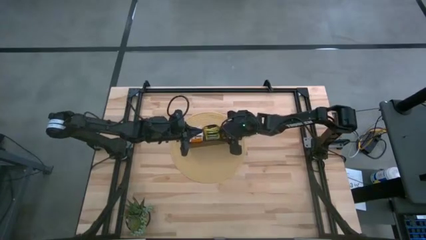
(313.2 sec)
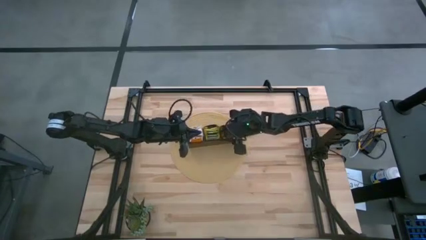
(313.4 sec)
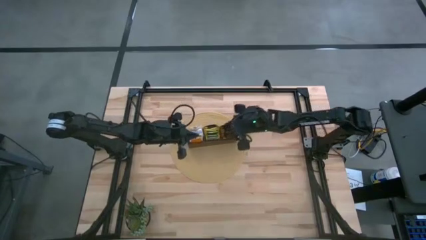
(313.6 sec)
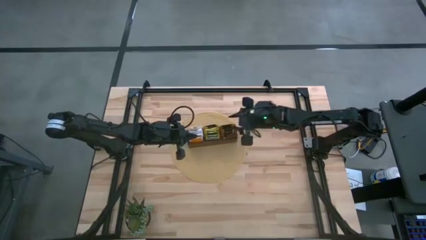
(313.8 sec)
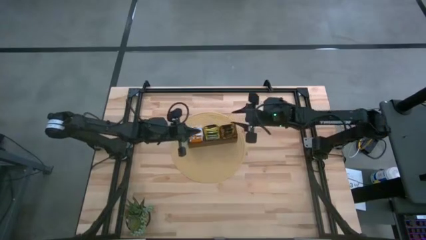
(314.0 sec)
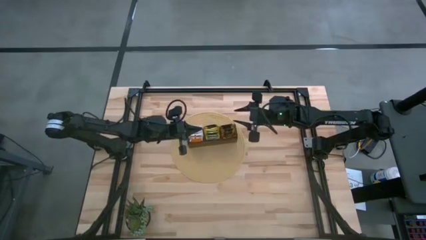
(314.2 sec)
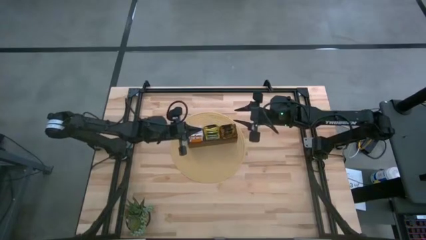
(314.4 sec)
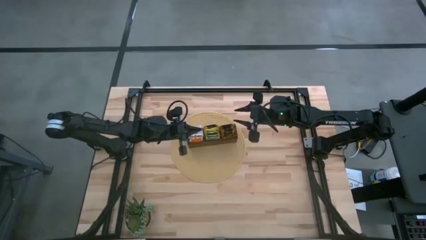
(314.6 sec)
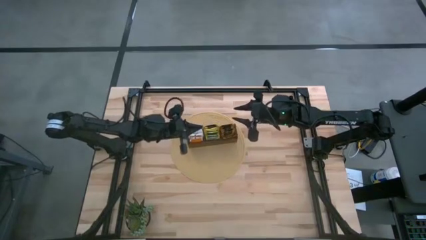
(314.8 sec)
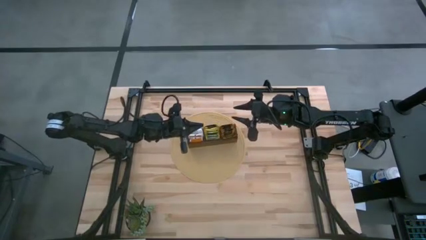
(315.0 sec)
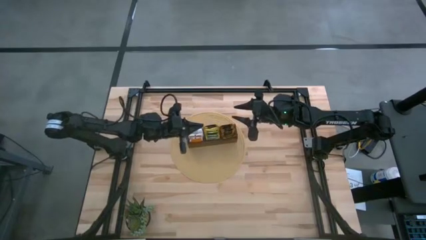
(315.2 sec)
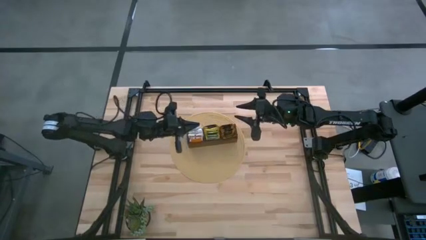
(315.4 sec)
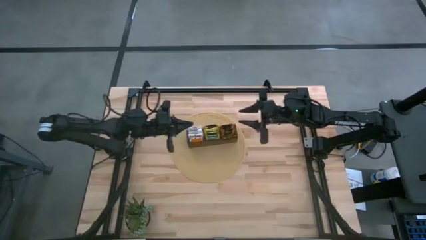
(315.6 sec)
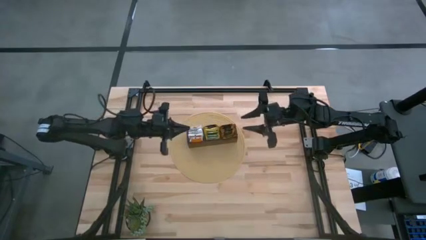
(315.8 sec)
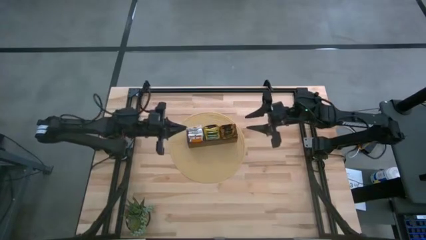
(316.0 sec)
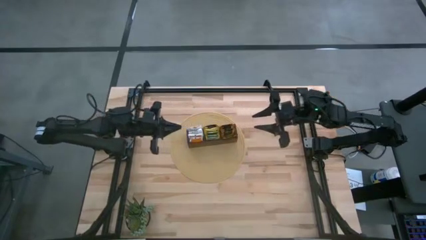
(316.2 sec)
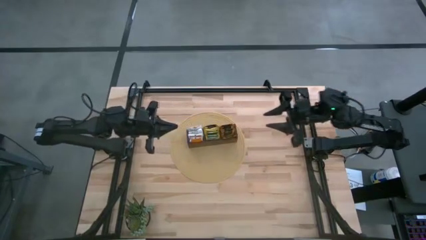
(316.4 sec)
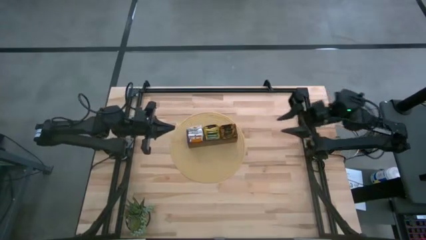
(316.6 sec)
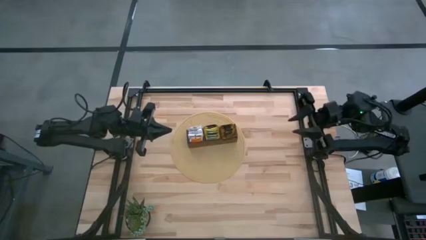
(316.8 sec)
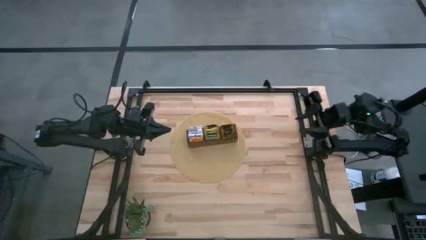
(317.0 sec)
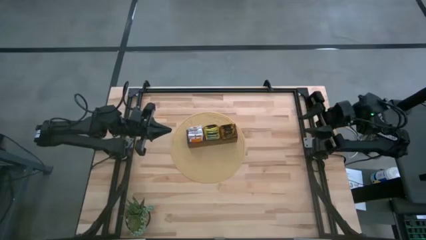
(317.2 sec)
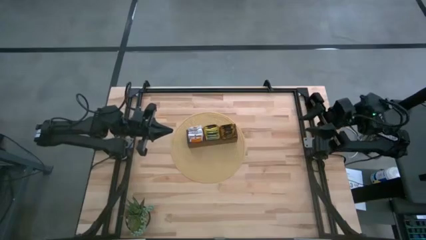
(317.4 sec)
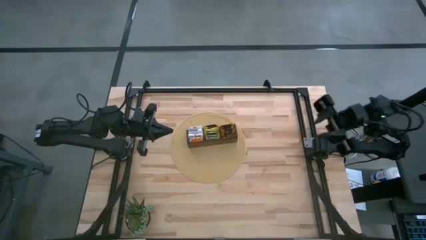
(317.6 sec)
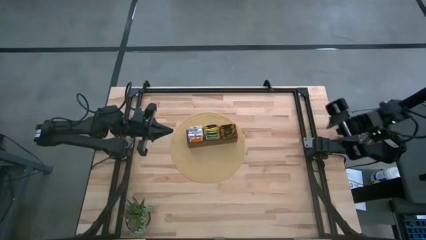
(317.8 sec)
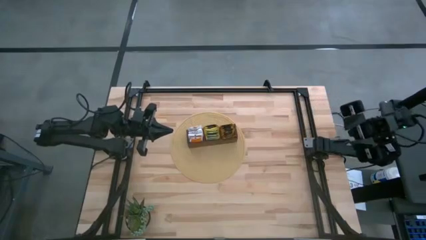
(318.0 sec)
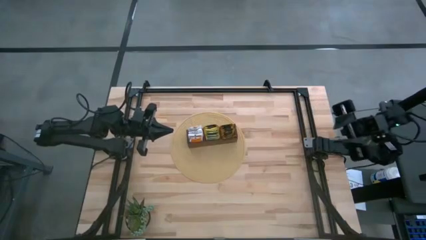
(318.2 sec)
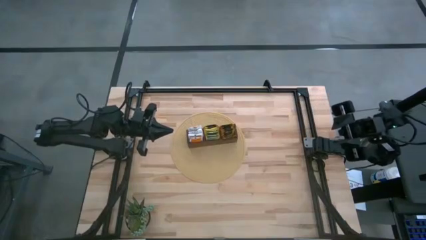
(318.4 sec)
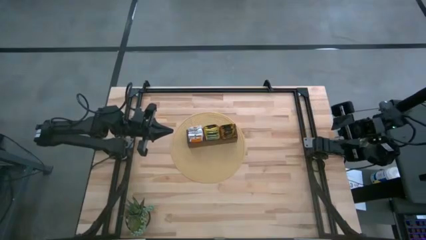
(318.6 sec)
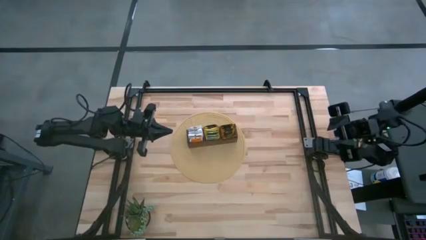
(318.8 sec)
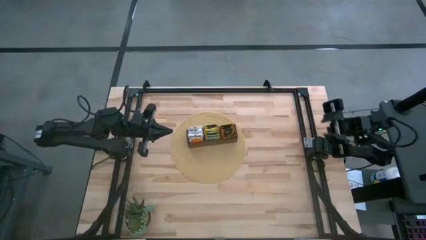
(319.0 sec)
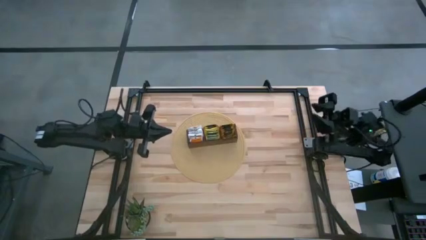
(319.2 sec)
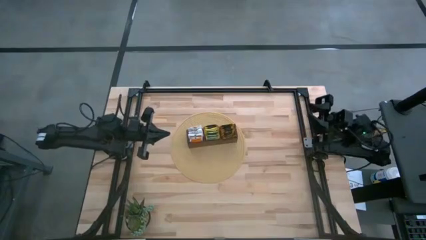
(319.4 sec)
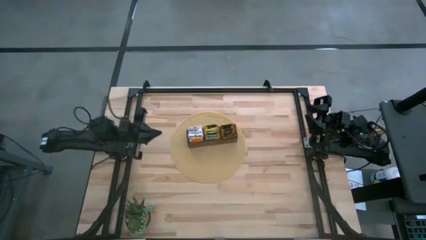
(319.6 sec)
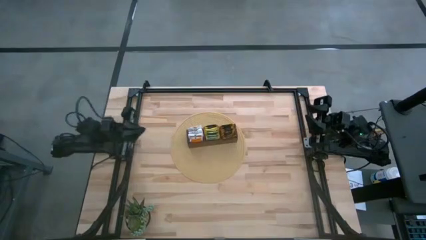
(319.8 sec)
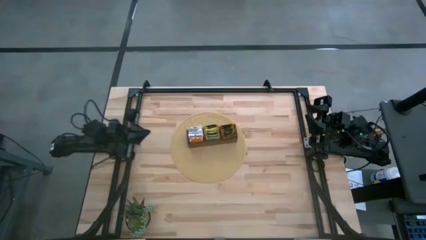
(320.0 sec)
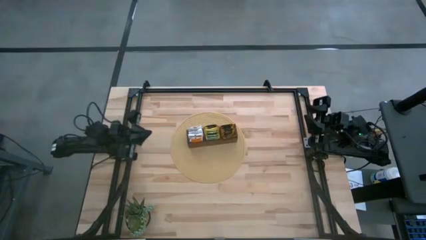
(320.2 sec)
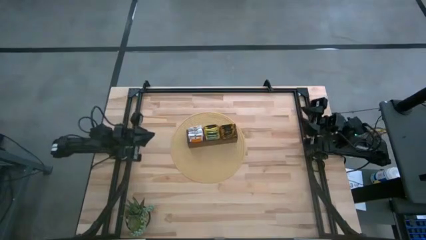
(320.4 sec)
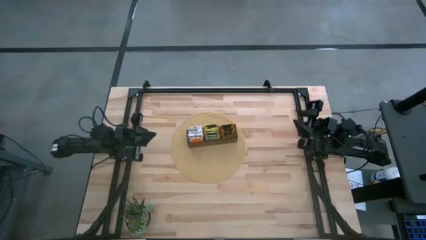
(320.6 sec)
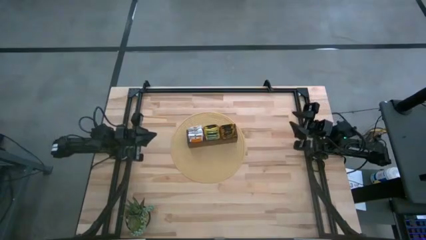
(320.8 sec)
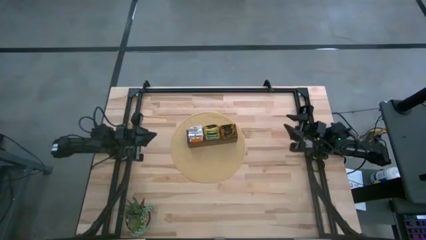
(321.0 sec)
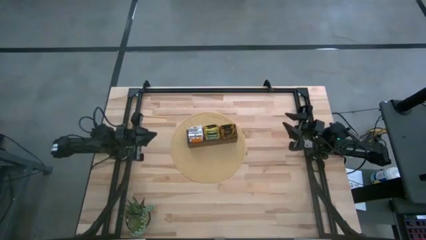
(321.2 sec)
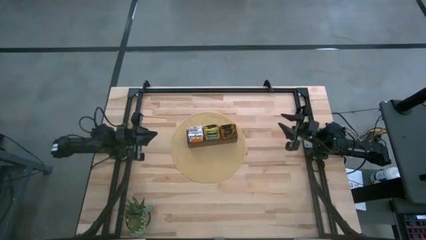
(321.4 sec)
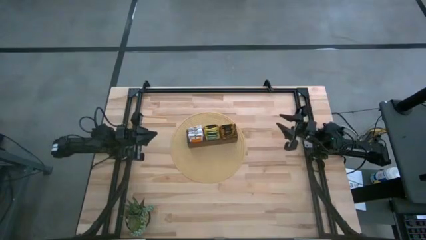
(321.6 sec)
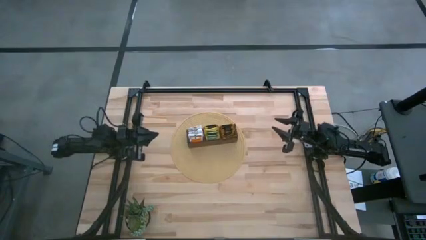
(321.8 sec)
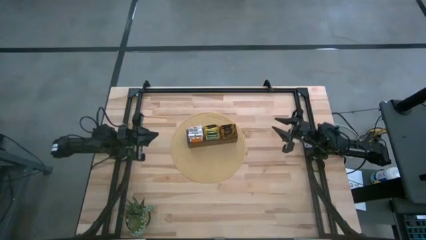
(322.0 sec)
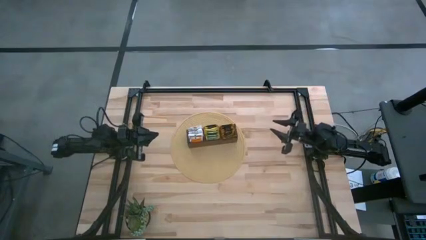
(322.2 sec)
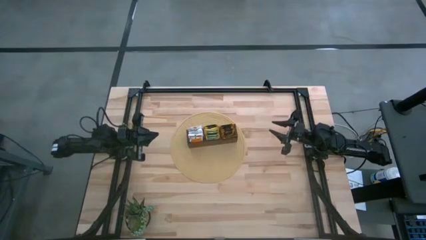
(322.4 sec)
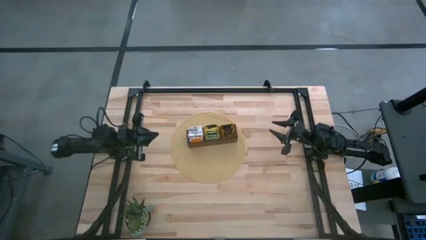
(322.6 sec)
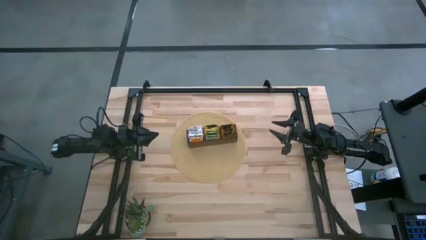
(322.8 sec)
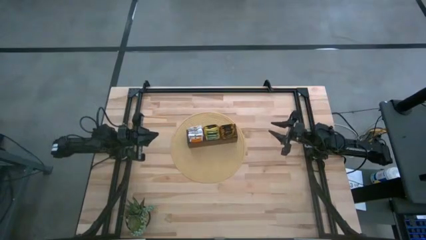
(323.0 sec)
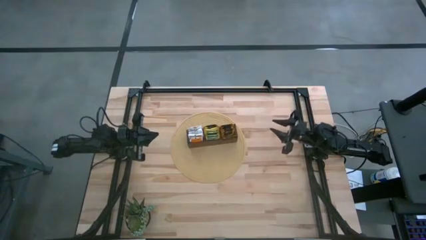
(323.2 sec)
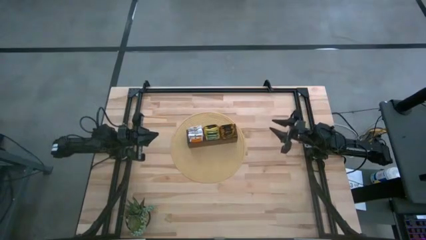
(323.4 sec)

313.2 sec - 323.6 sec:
Task: Pick & Place Tea
Return to Home Position

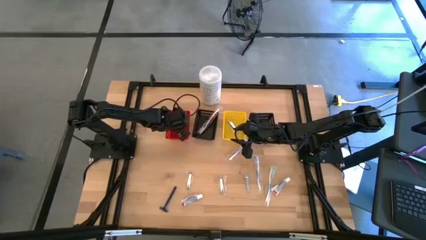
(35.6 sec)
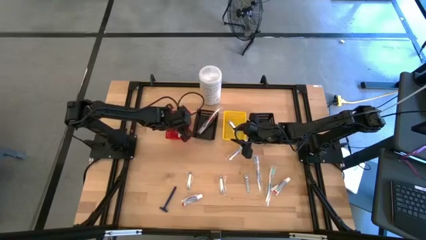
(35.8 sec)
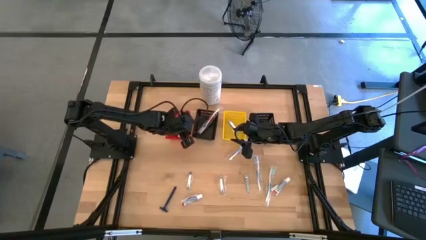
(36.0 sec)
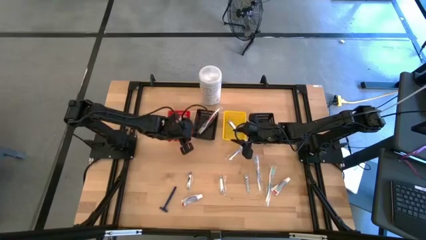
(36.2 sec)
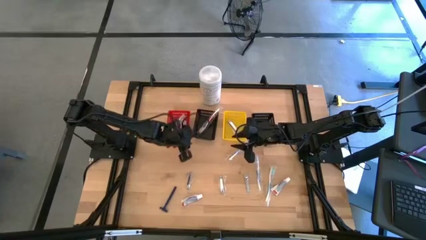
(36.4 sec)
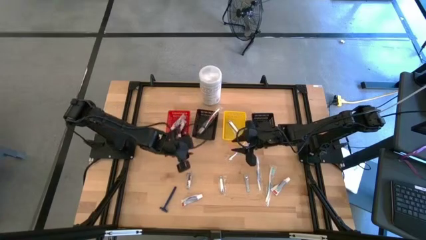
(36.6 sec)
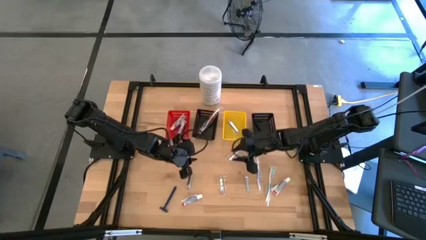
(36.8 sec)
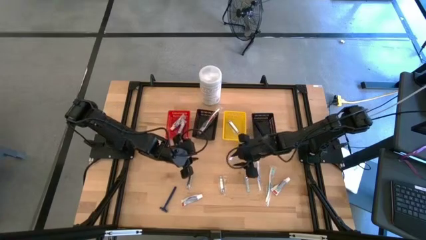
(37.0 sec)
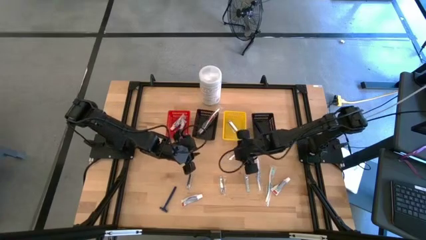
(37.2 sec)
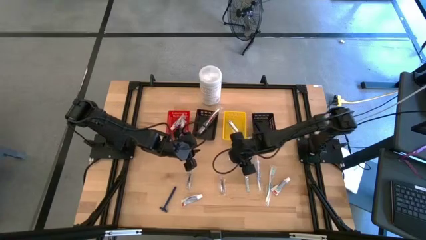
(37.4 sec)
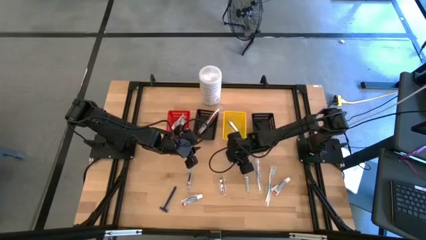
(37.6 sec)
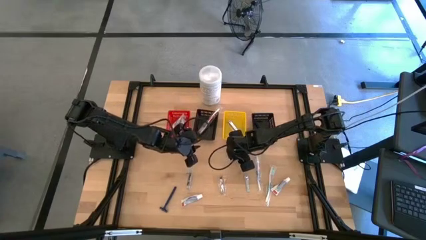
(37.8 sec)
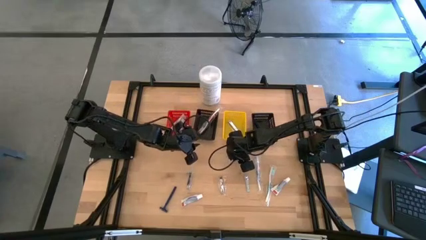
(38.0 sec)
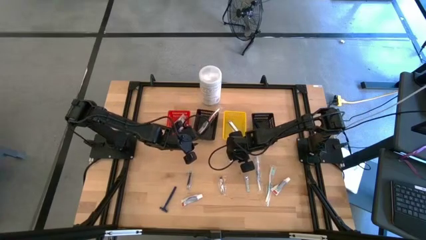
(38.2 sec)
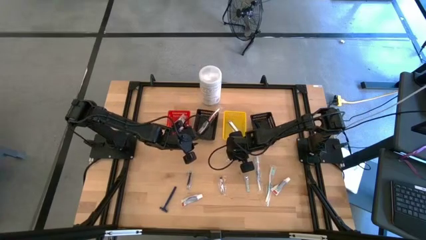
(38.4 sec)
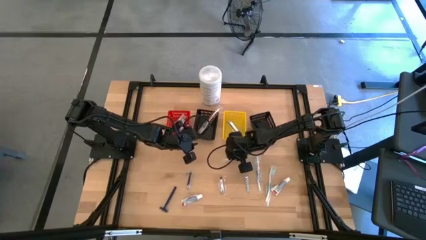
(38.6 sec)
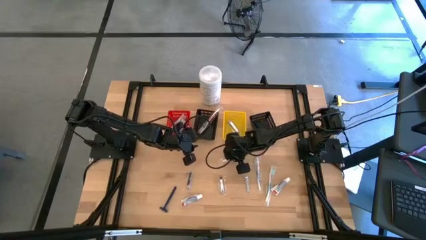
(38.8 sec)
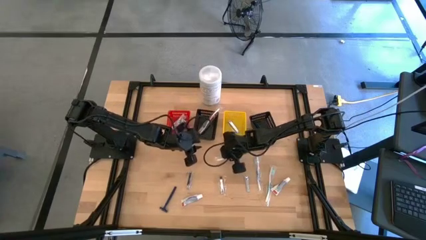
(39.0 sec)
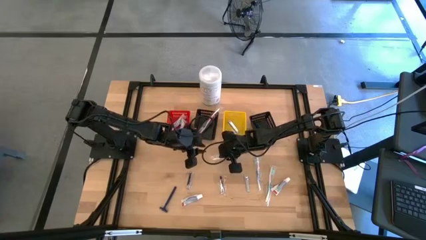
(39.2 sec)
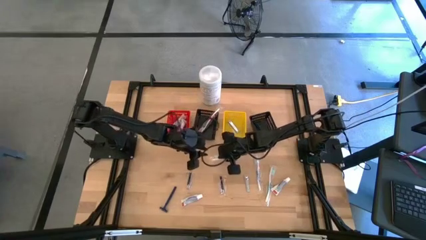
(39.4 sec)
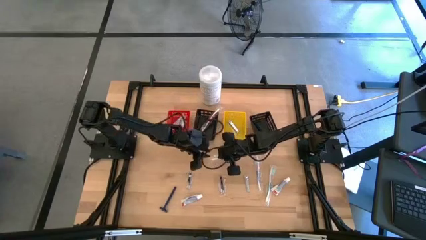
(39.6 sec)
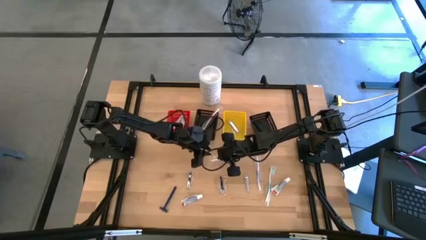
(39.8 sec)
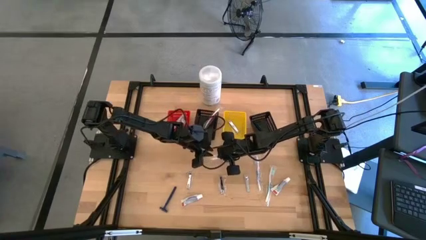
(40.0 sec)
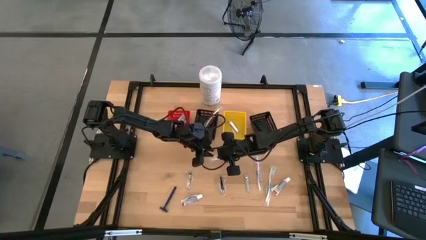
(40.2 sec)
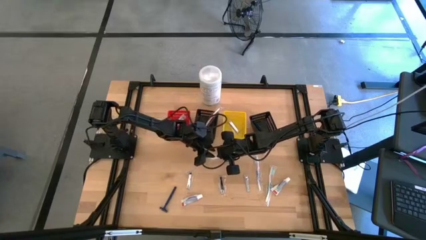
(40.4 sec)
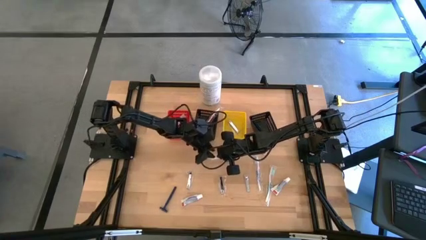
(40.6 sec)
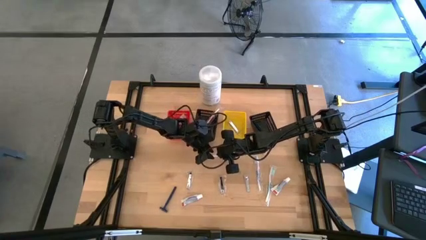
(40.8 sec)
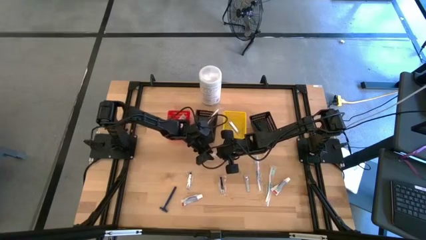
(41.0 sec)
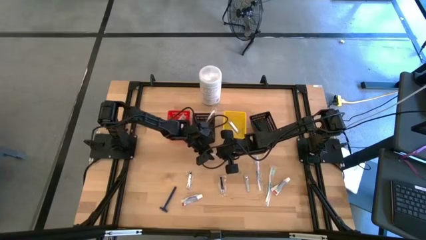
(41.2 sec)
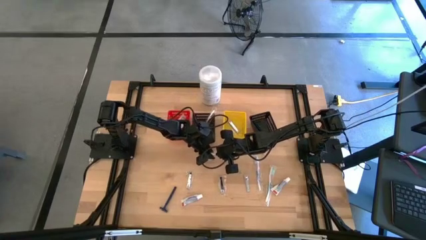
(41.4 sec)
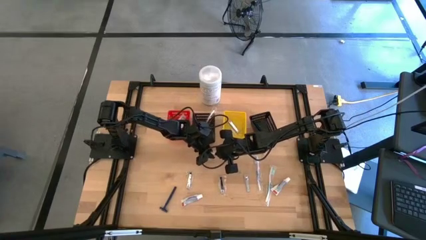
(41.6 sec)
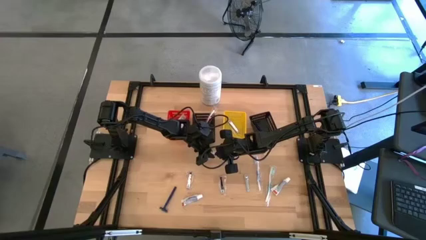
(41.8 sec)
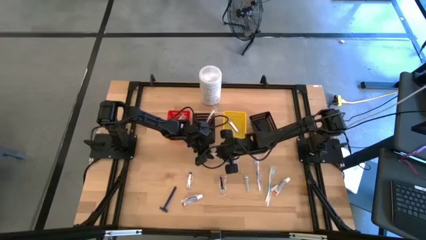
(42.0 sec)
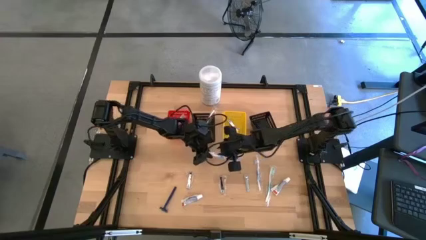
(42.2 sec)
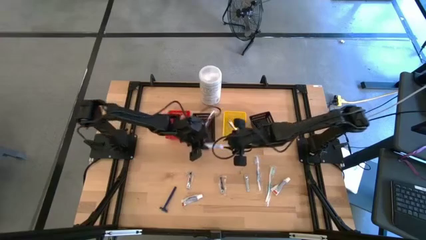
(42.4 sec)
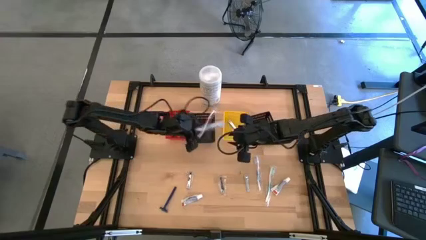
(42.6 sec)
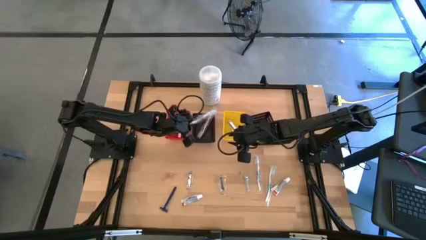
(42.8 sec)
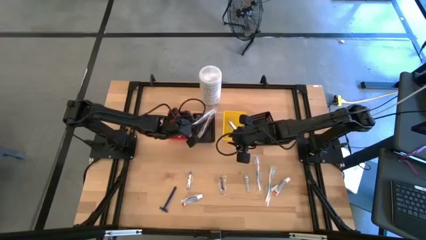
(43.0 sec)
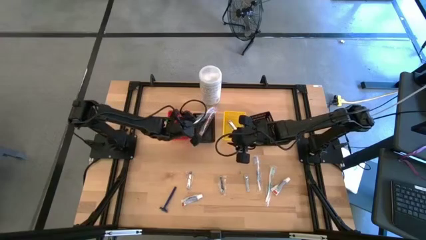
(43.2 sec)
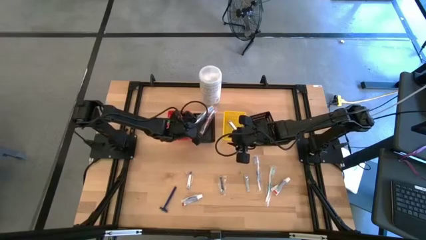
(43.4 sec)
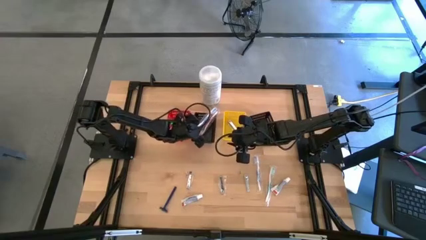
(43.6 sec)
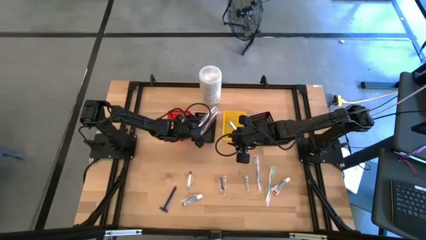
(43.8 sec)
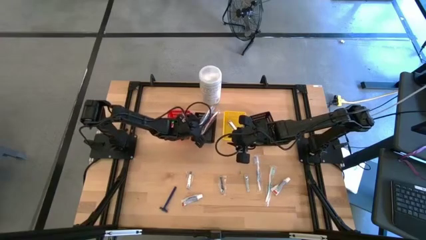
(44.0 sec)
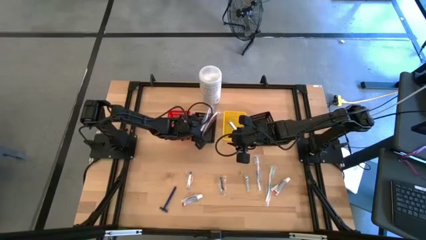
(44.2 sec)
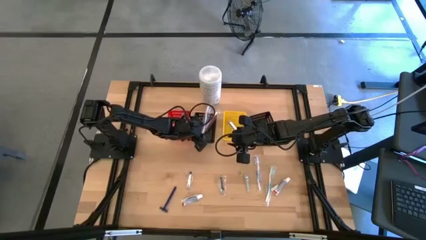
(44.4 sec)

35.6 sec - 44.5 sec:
Task: Pick & Place Travel size toiletries
Put the top blue toothbrush into the left black basket
